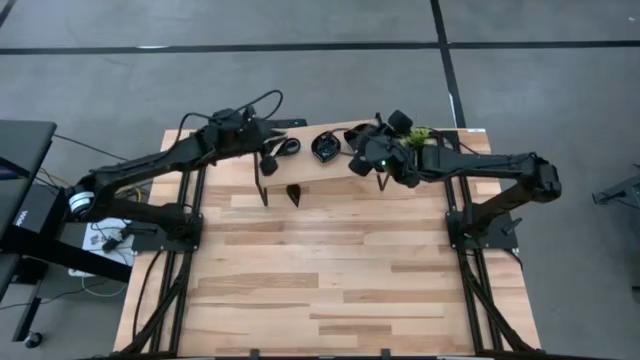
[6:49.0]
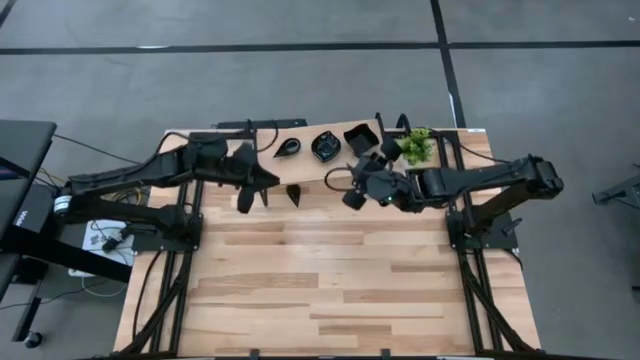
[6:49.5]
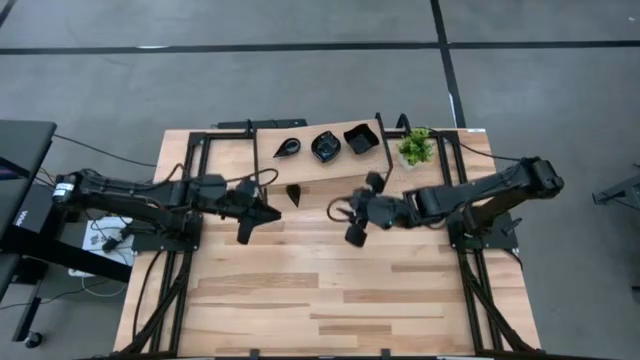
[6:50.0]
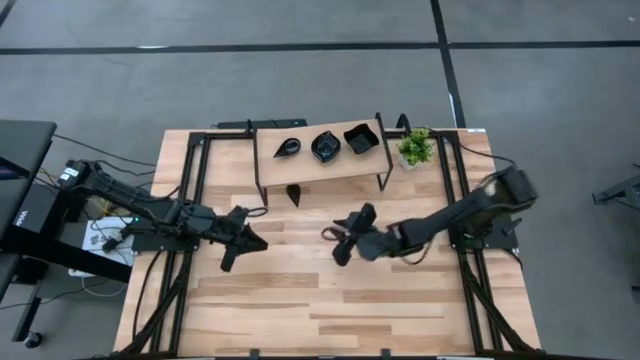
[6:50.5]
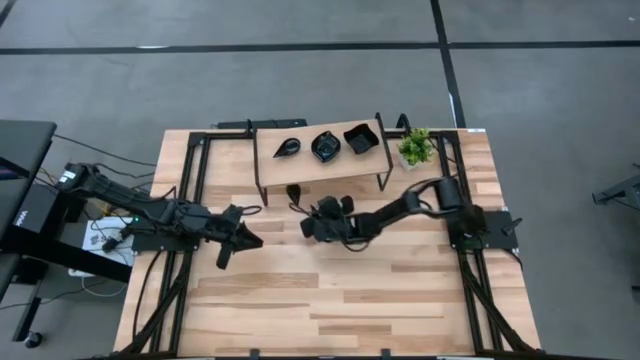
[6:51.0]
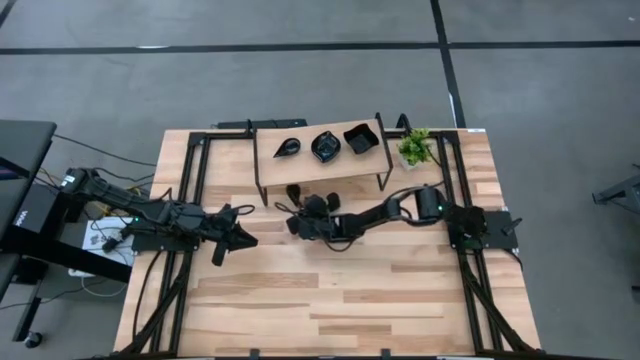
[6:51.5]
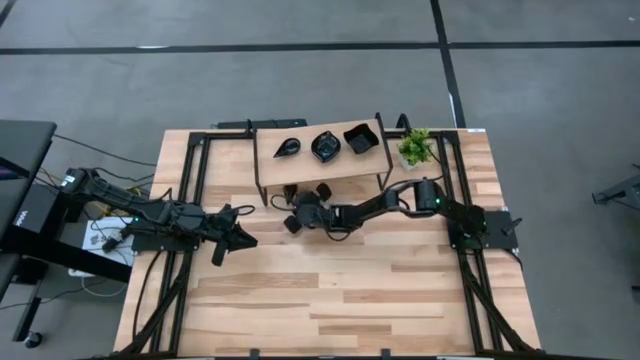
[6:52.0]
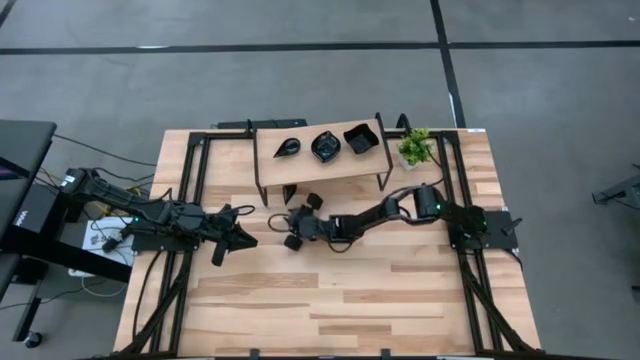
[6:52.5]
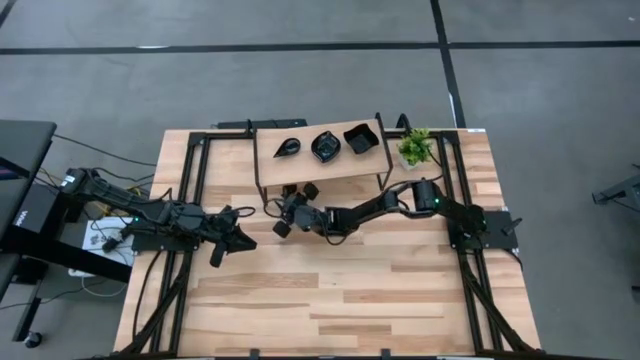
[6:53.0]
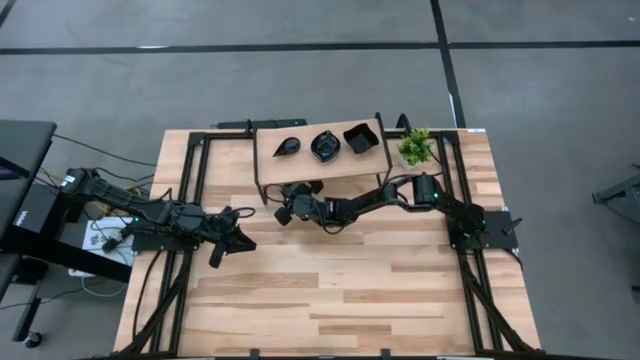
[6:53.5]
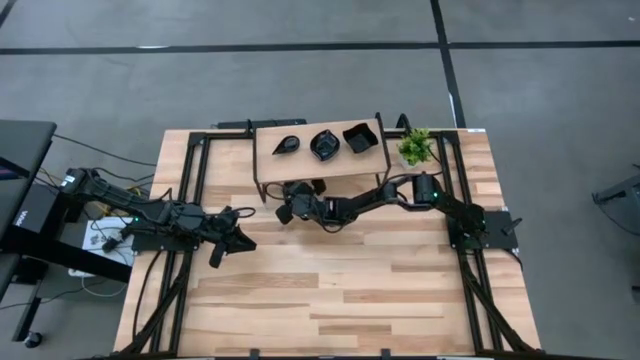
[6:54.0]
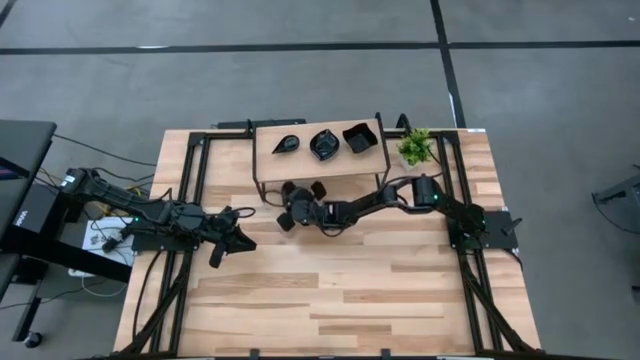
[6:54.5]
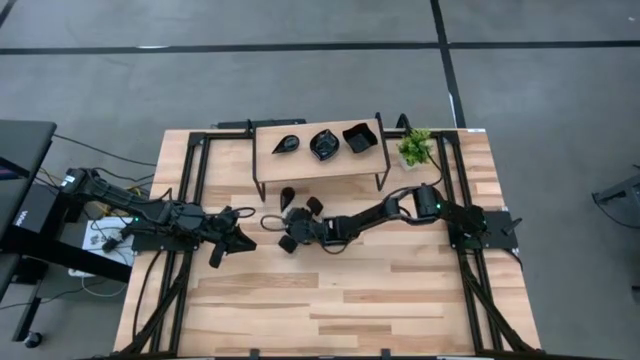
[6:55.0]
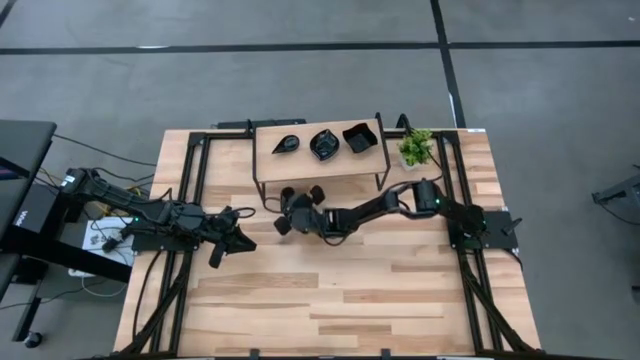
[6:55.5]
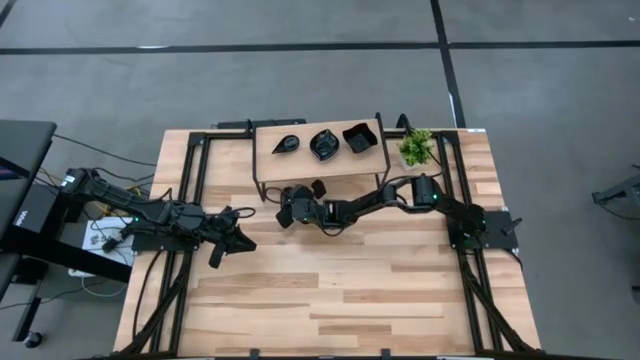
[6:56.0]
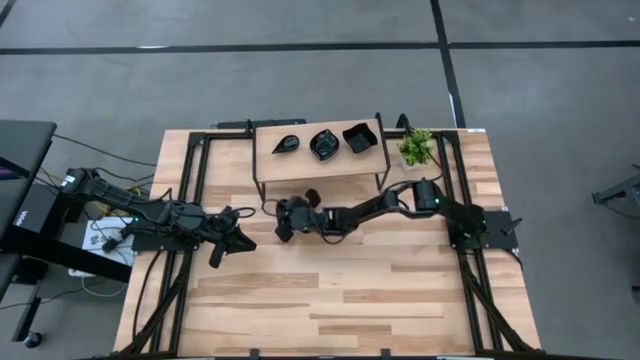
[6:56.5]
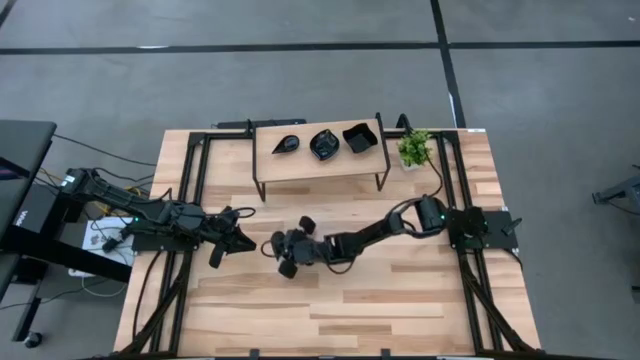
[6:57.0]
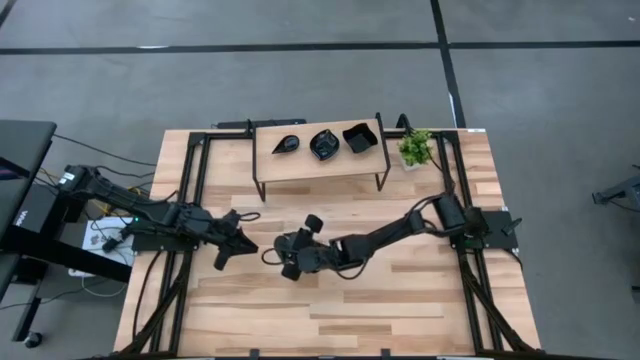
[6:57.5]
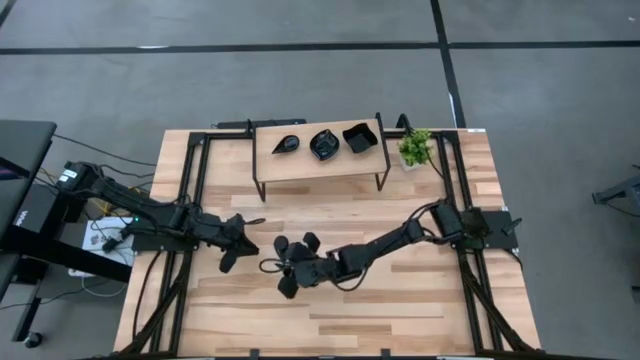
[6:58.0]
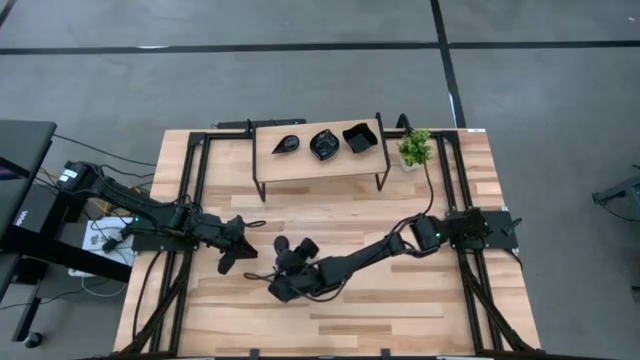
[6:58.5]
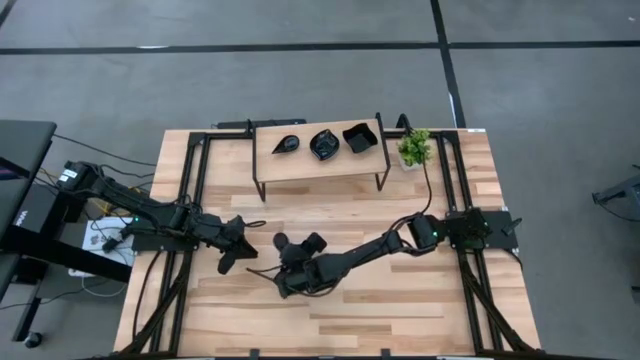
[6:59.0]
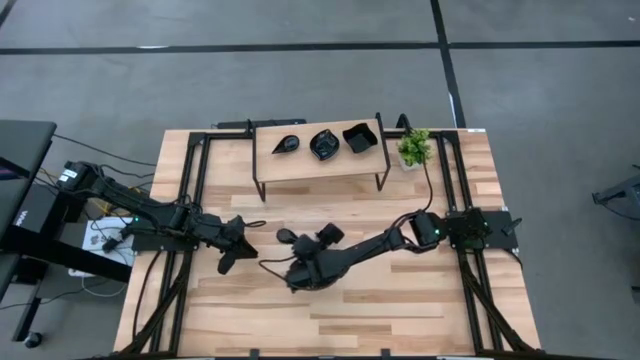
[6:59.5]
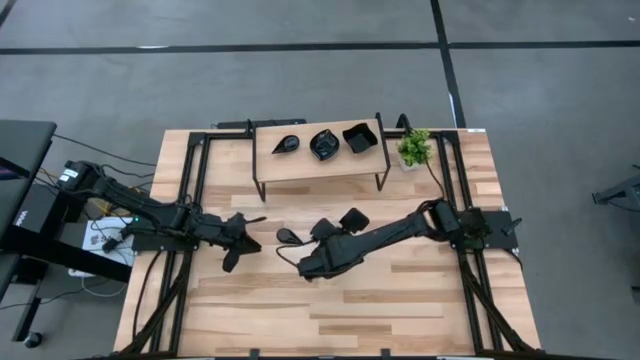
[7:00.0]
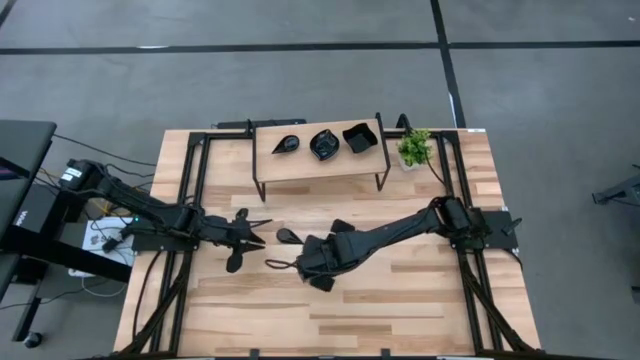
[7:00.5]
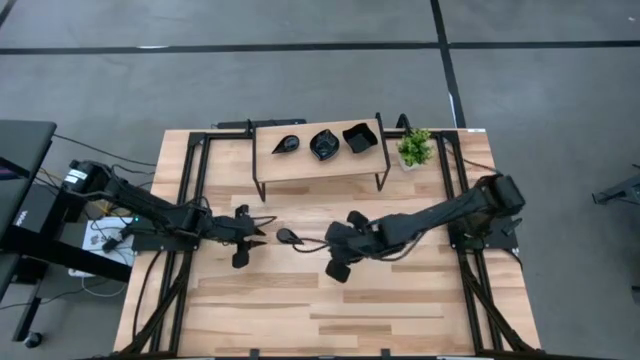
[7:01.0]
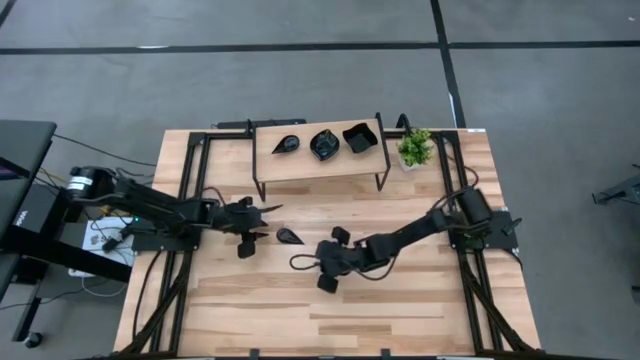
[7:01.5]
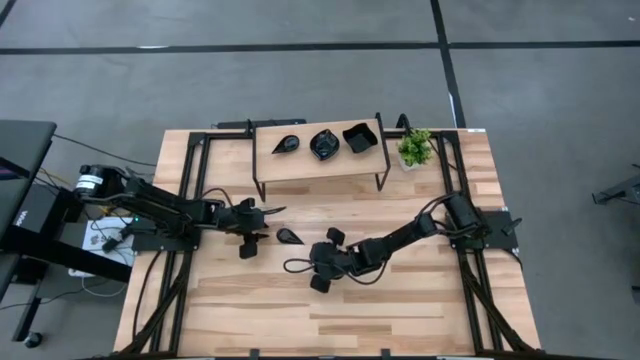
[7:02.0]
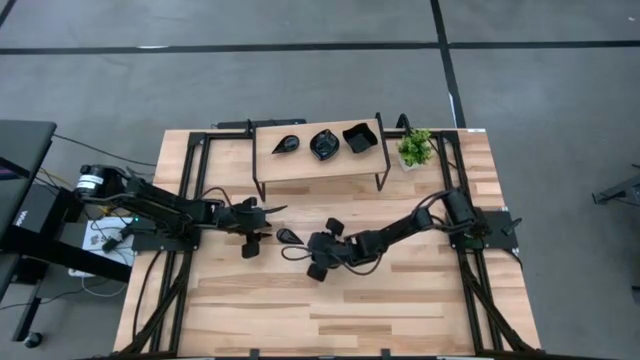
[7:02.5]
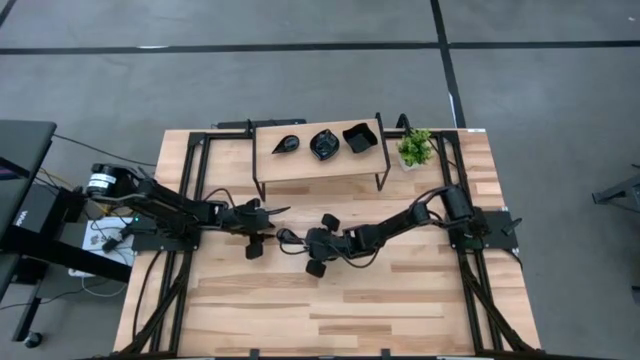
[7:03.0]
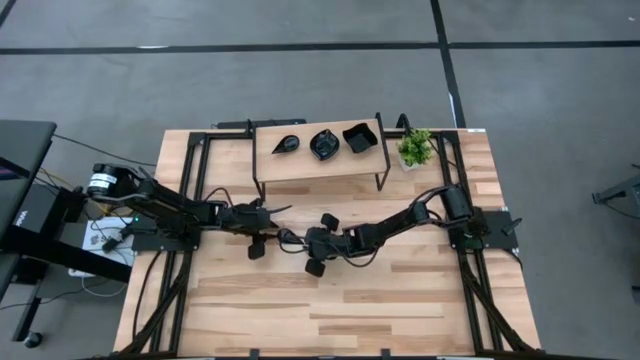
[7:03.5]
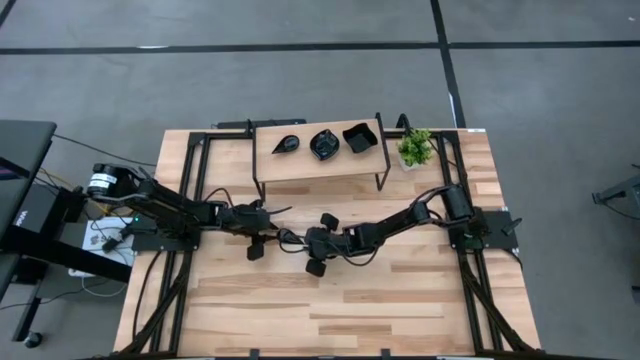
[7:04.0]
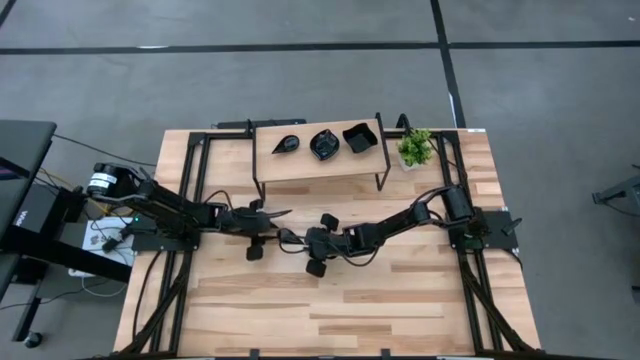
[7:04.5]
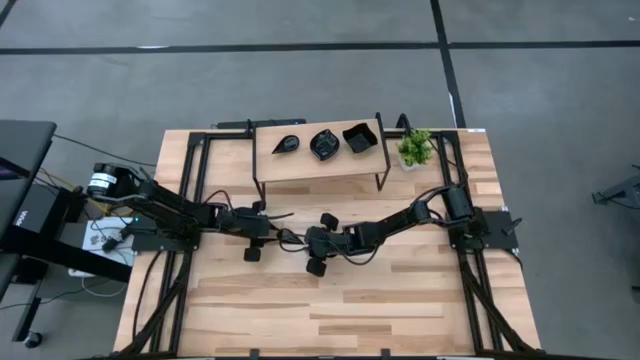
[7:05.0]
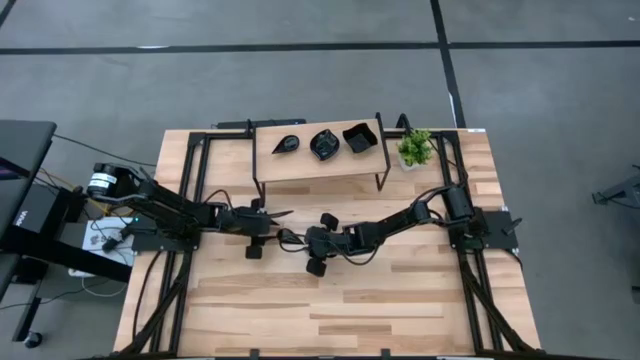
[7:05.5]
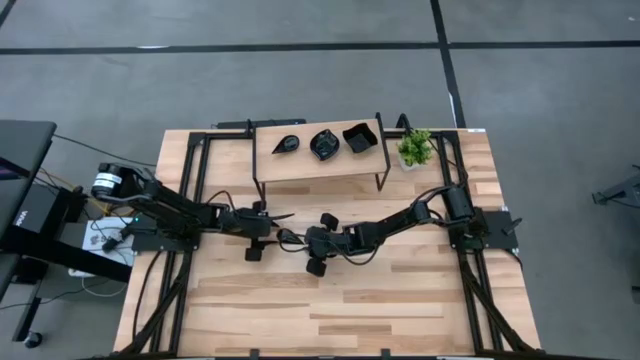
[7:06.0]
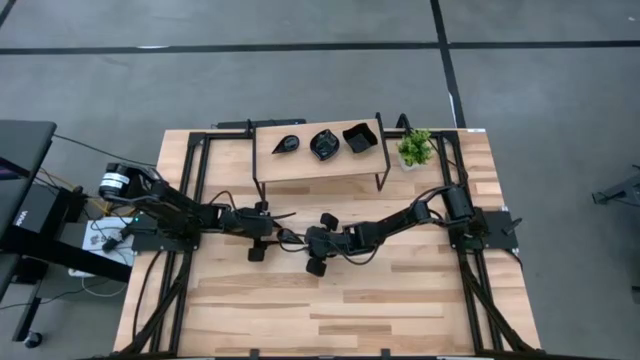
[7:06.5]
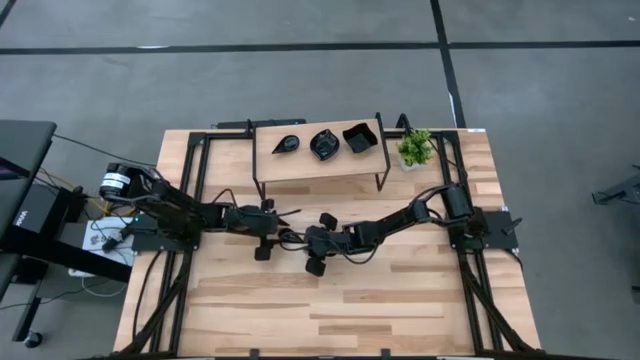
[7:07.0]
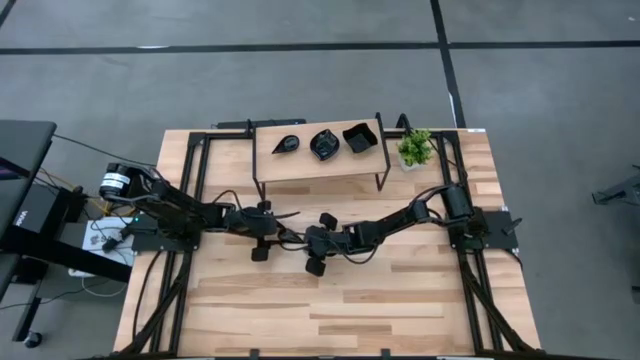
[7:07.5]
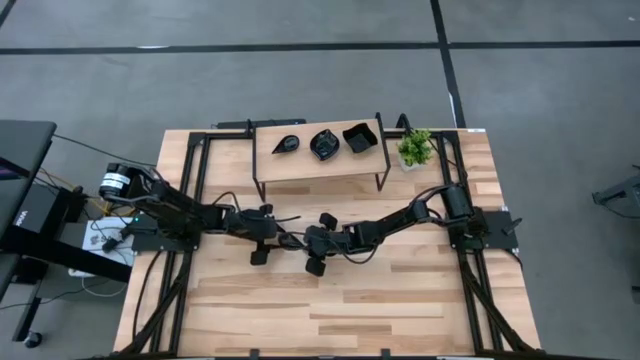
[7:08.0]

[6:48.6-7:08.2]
Task: Pick & Place Mini shaped plates
Stack the black drop shaped plate on the black drop shaped plate on the shelf

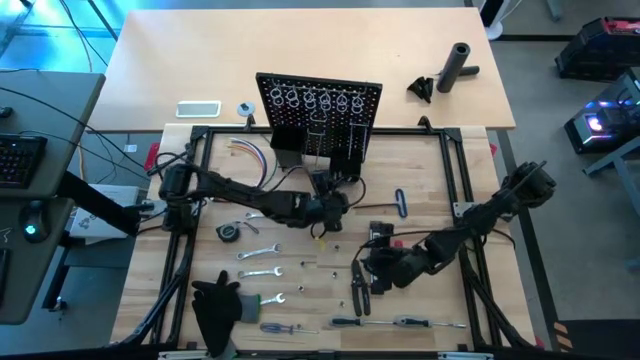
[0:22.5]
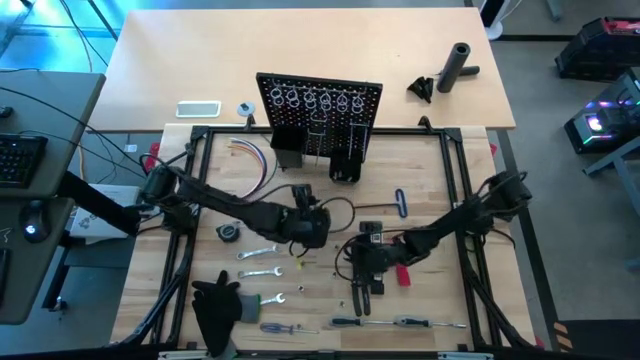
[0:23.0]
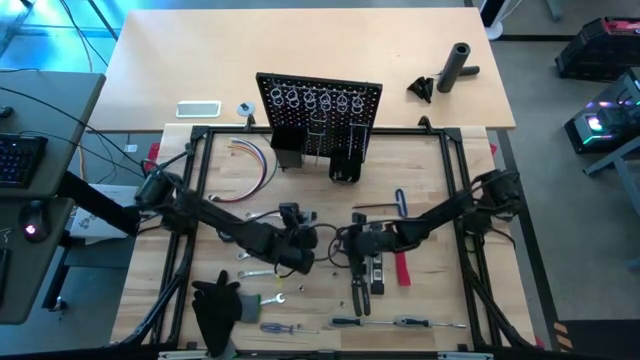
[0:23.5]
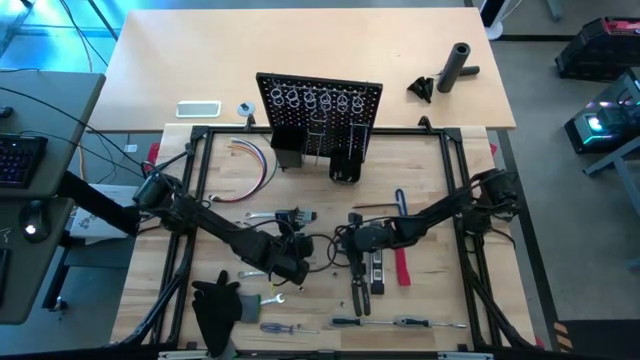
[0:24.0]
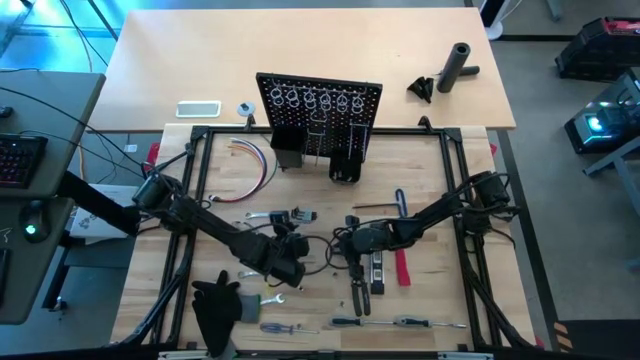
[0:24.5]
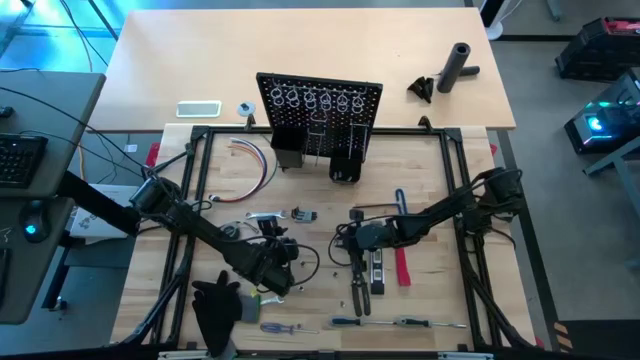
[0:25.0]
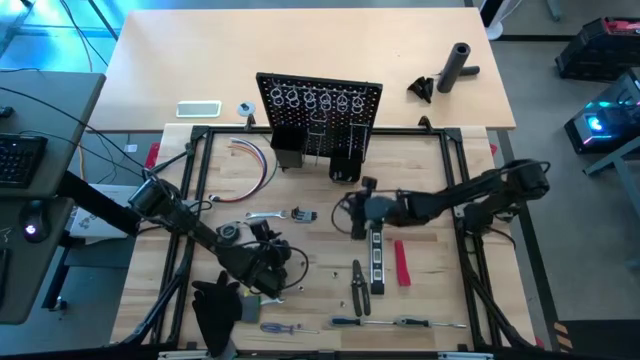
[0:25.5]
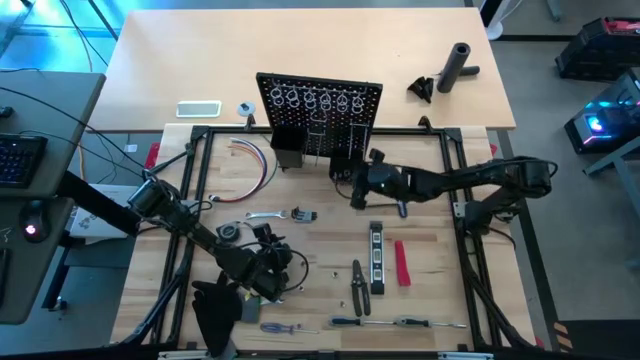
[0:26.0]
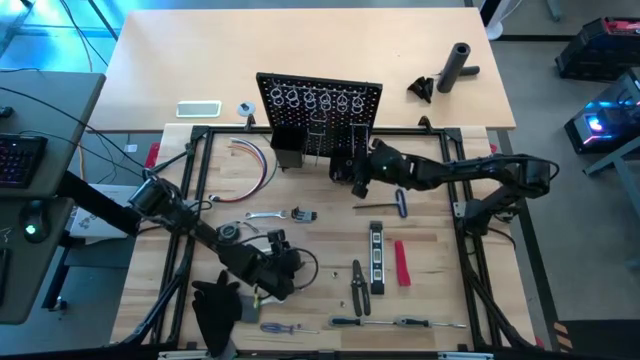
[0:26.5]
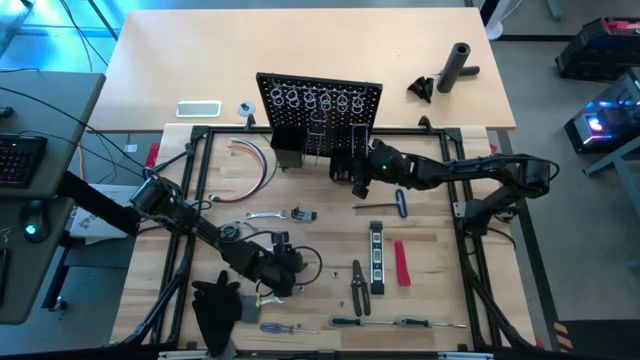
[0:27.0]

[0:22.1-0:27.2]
Task: Hang tools onto peg board
Put the socket into the small black bin on the black pegboard
